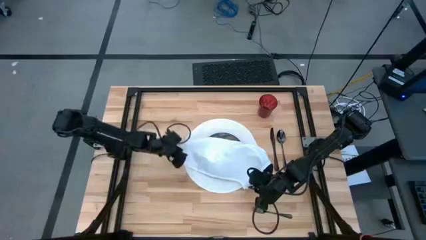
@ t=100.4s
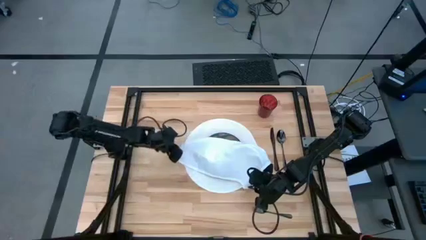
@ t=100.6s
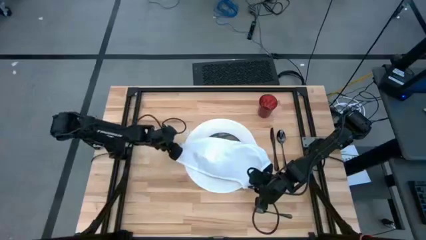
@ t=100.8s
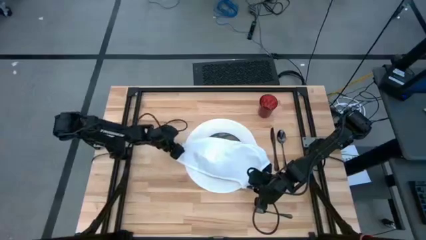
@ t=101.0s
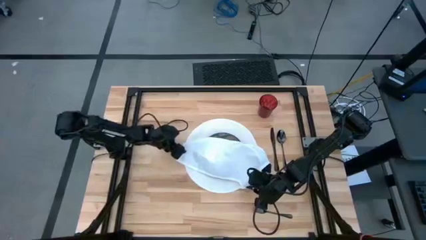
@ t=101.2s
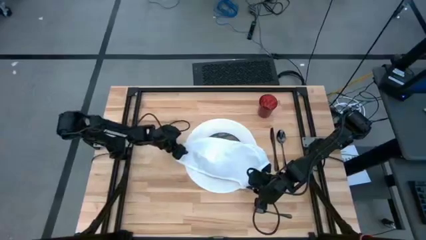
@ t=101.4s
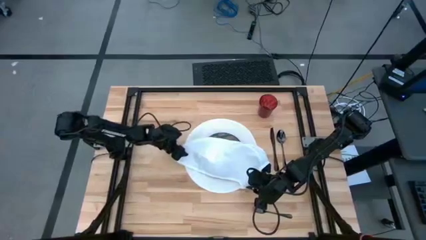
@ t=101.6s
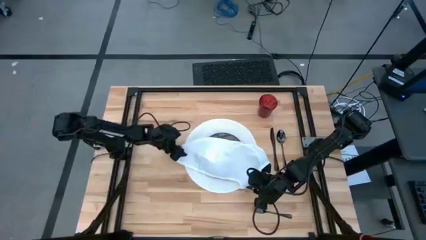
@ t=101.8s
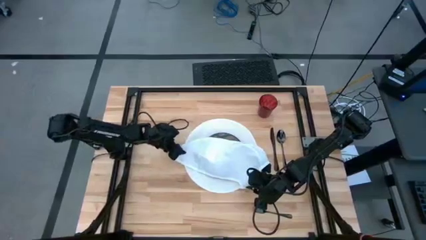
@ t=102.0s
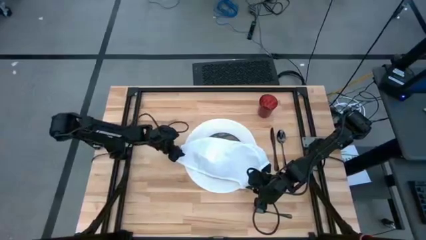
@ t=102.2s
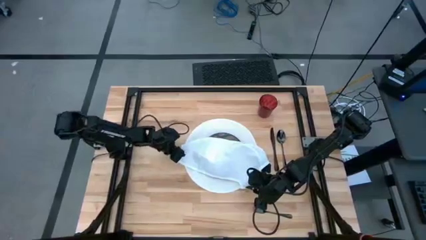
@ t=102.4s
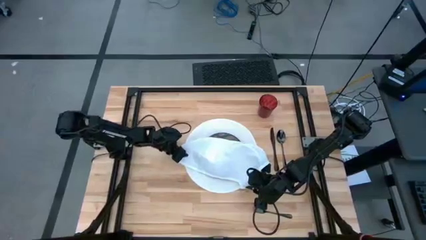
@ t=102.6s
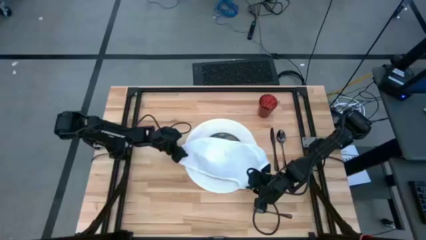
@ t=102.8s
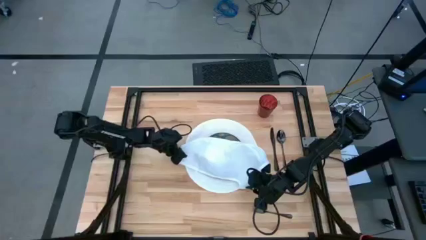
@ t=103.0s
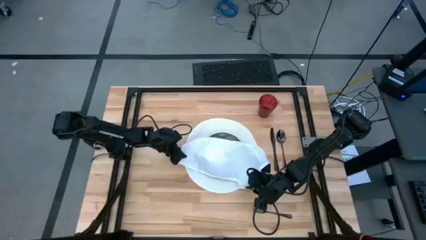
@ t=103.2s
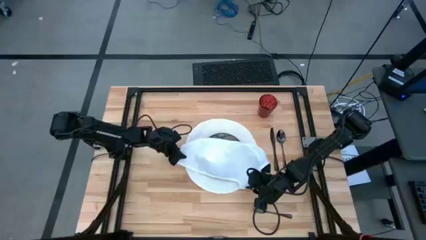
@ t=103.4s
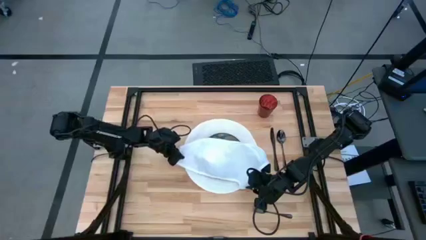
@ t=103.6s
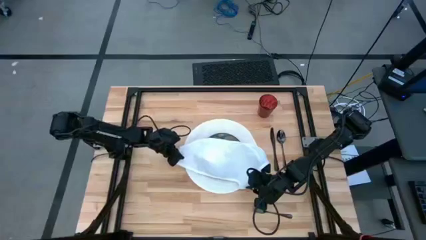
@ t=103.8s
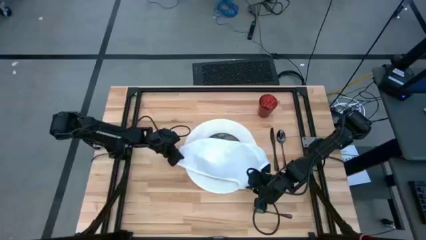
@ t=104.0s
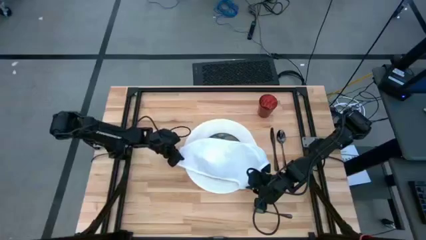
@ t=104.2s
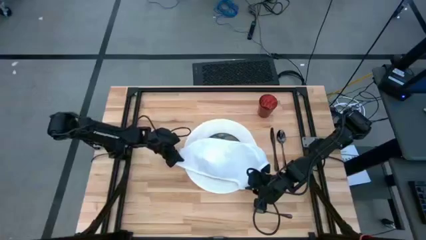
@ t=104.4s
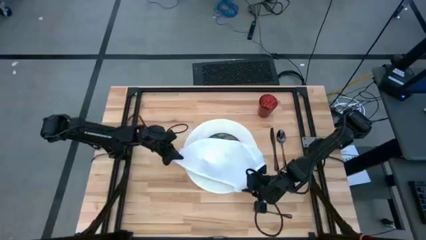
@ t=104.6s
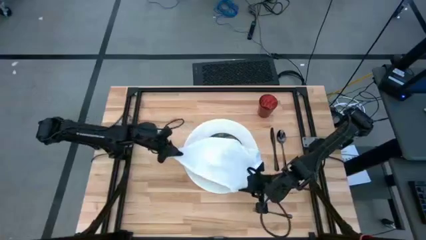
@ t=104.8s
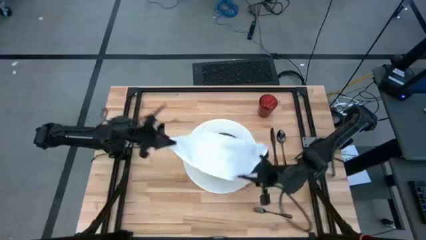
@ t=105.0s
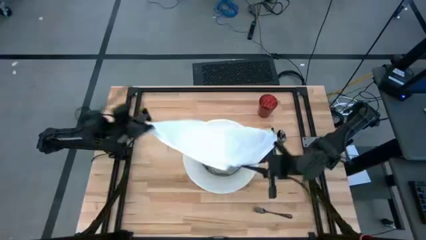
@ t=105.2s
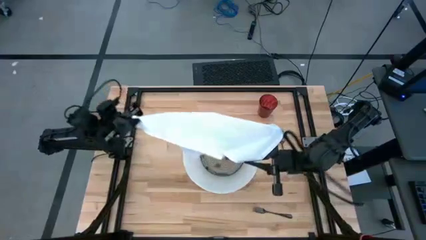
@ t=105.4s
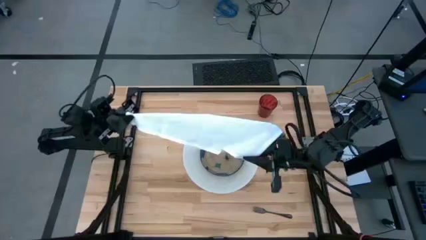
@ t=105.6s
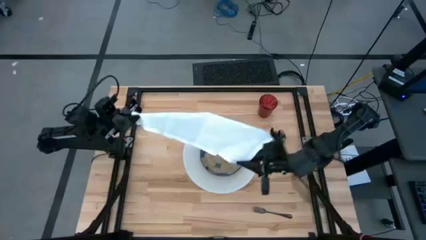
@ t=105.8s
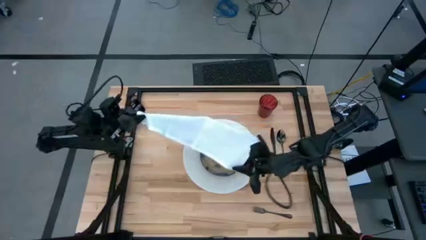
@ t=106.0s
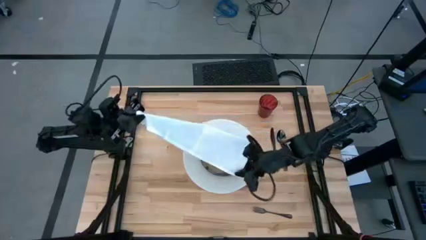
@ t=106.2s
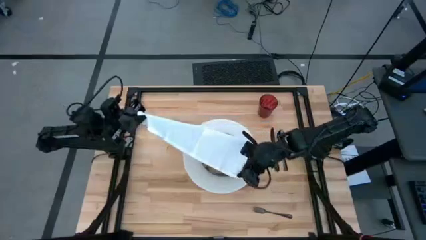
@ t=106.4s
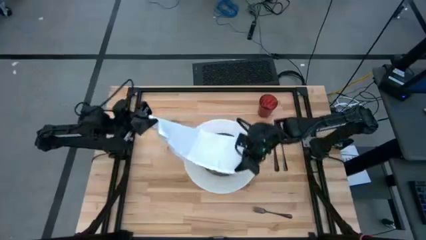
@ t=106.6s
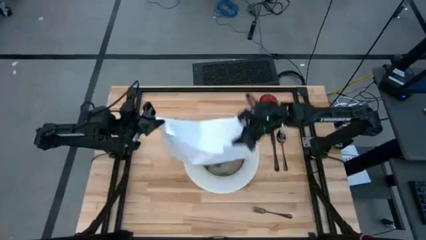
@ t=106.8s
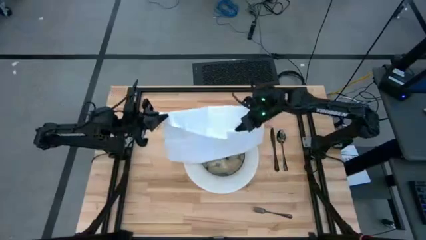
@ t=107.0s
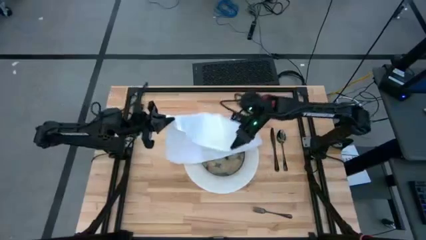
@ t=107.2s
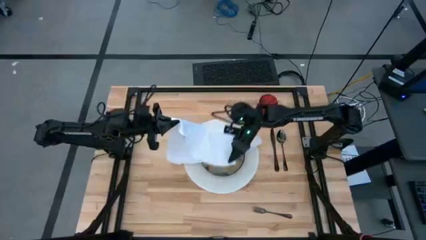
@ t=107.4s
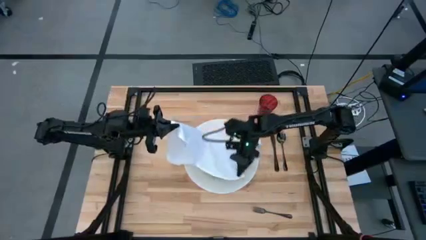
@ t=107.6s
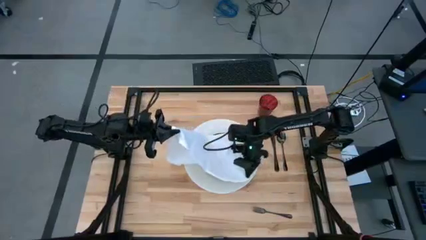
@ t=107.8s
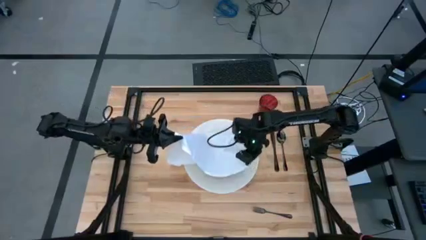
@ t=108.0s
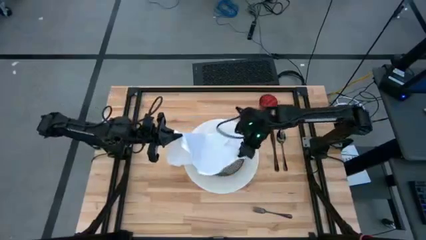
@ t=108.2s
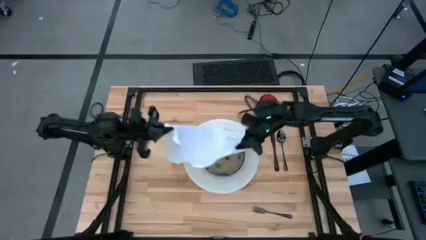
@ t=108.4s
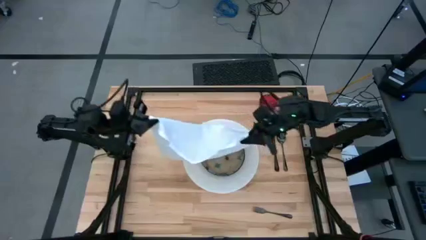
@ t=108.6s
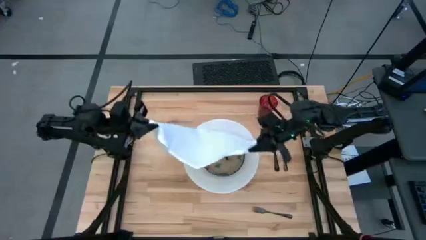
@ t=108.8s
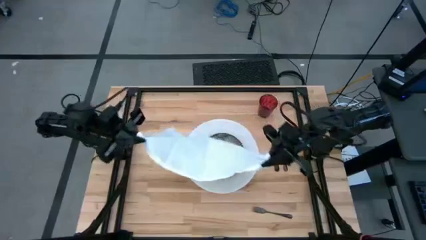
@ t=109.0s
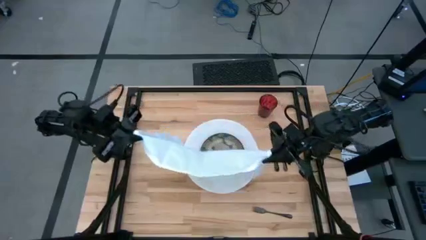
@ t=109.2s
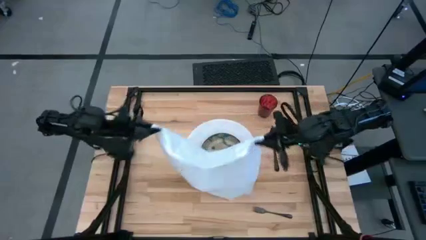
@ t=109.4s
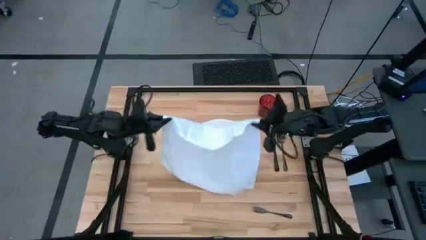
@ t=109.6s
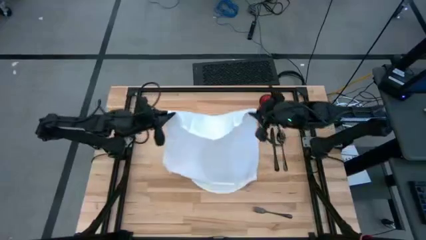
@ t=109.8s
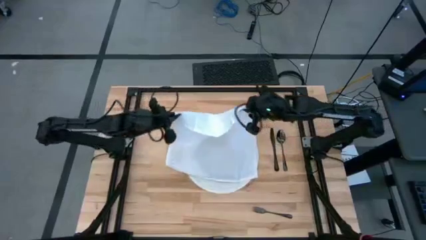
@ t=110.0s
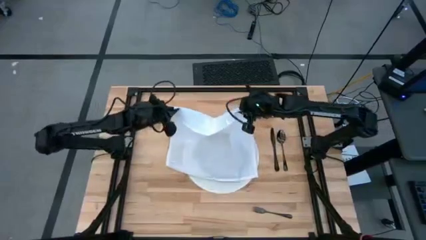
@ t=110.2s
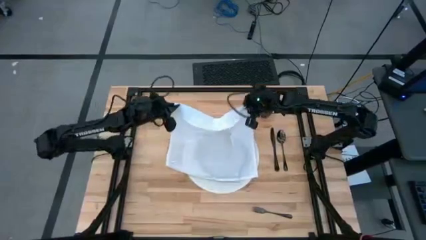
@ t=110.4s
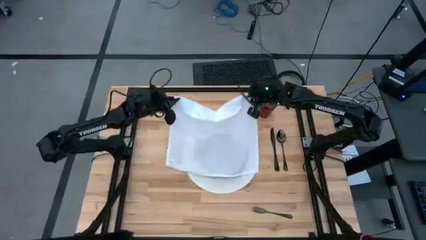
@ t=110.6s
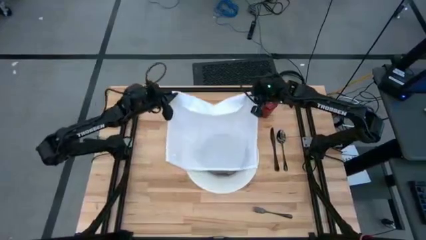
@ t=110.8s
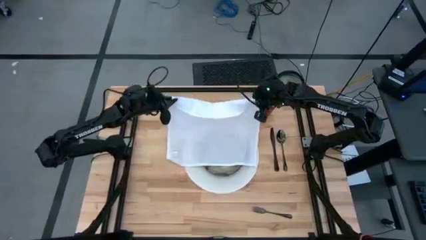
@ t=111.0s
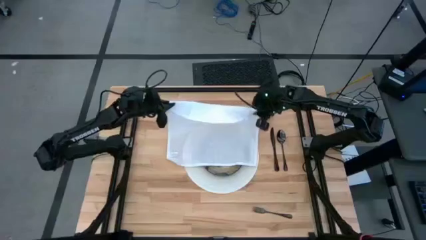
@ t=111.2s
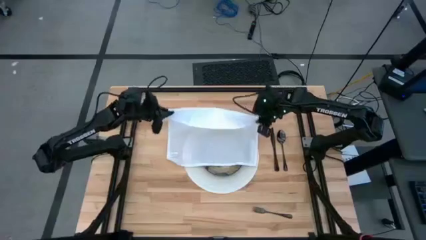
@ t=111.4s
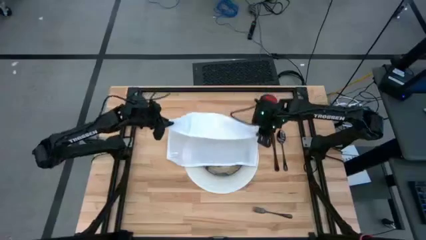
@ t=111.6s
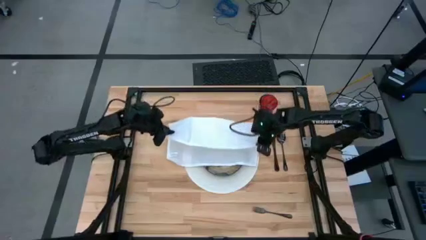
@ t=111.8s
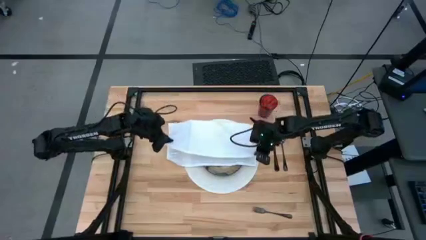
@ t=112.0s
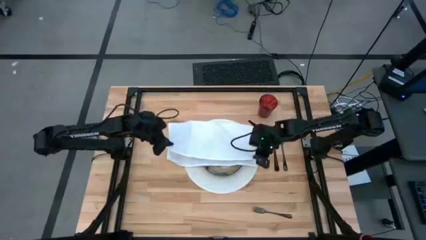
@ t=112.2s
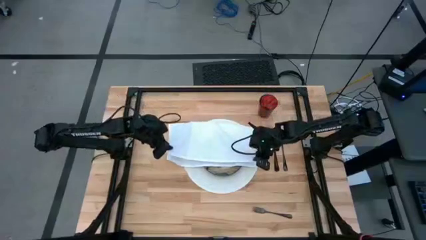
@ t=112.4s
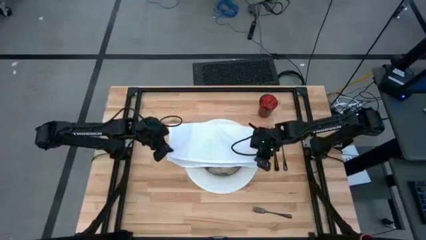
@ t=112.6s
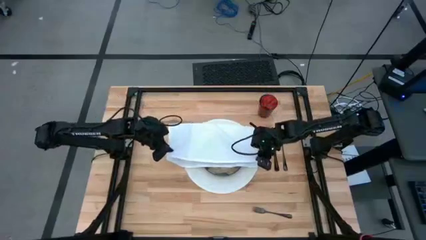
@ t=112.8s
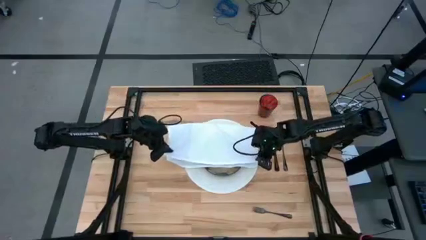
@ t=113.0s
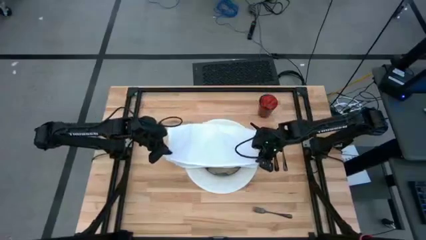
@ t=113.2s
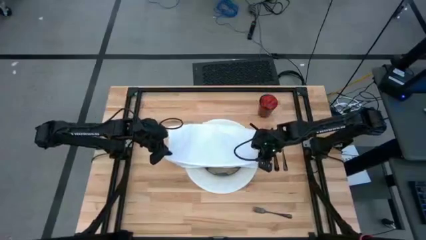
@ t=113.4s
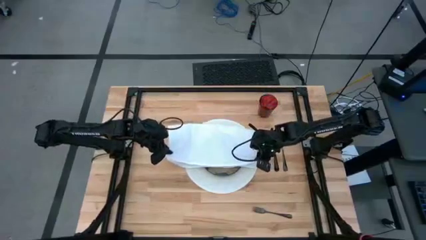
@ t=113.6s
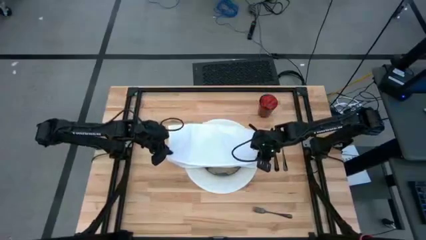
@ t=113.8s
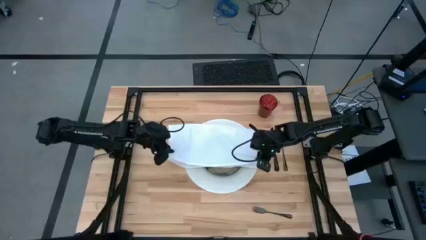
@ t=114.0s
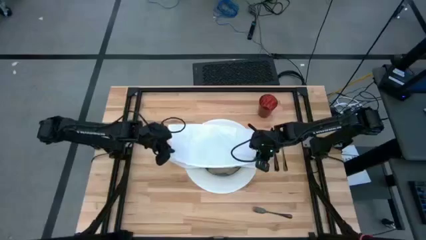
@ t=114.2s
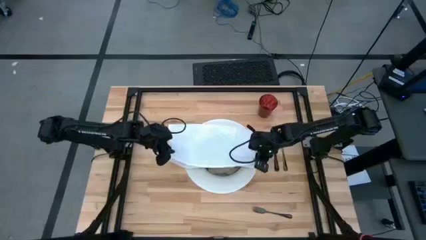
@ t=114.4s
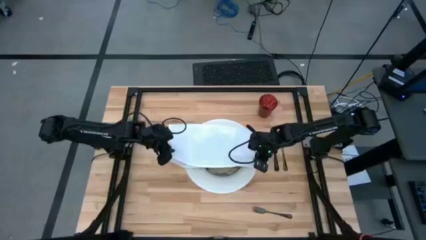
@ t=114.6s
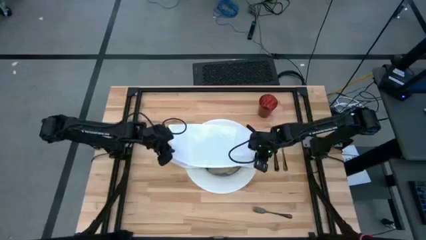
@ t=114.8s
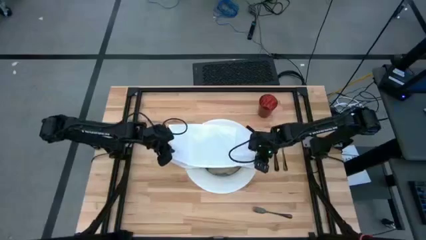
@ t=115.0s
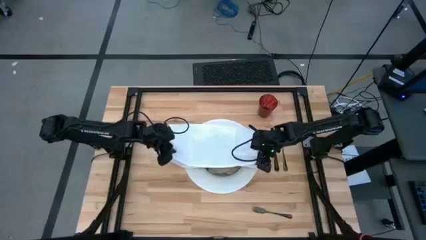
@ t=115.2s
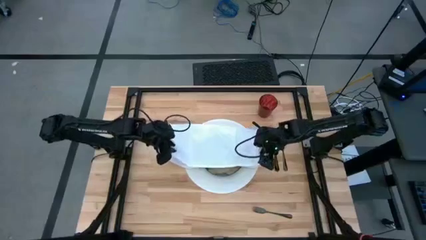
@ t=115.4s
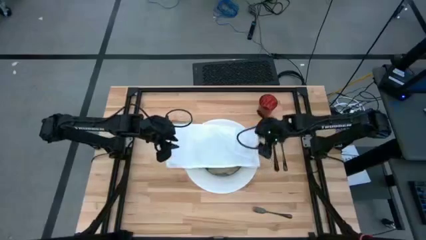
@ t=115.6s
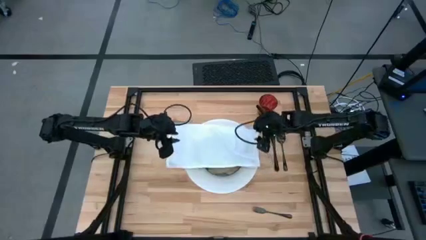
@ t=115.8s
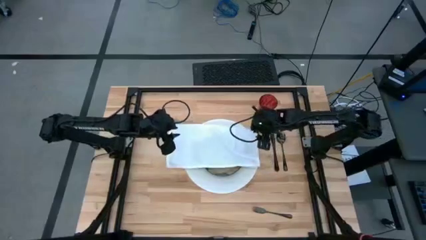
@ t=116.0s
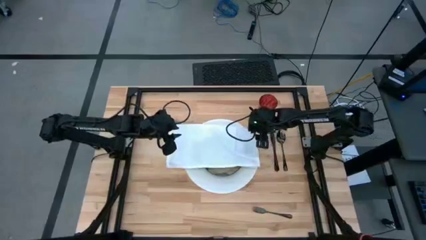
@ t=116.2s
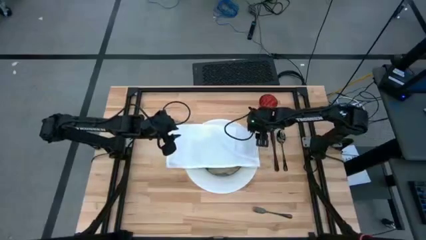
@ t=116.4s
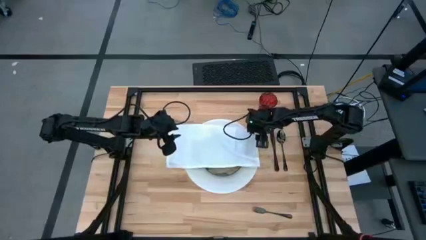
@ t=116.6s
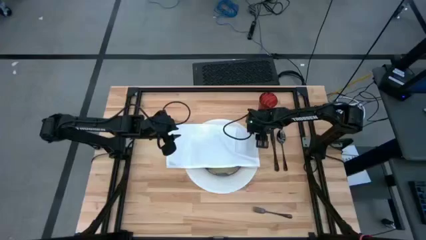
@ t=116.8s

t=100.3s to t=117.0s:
Task: Set table place
Fold the white table napkin
